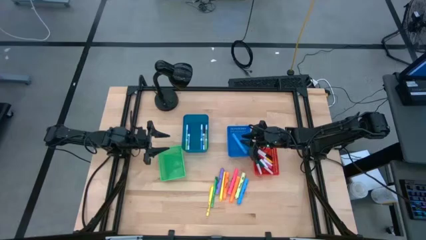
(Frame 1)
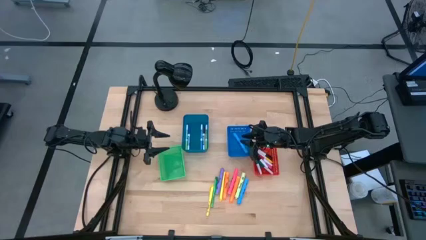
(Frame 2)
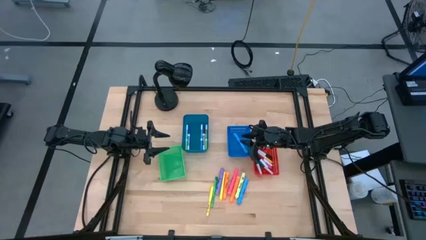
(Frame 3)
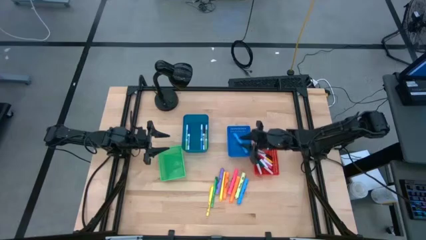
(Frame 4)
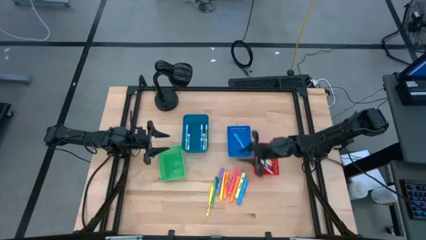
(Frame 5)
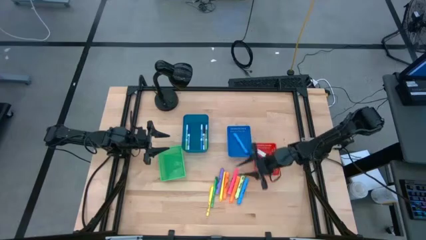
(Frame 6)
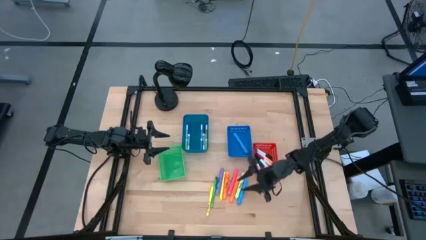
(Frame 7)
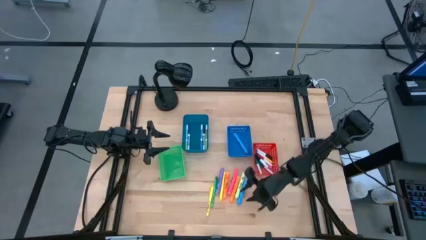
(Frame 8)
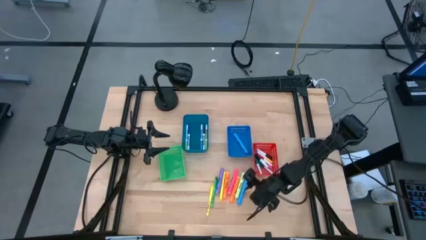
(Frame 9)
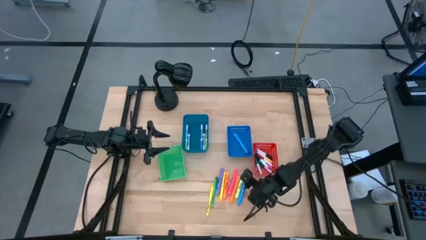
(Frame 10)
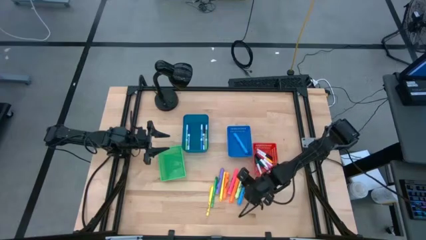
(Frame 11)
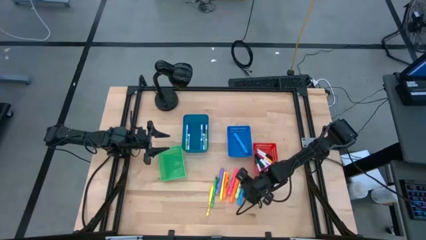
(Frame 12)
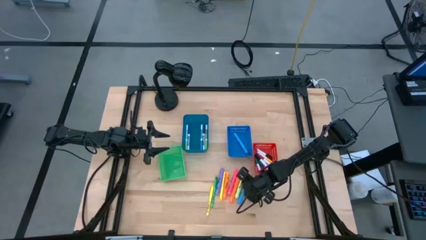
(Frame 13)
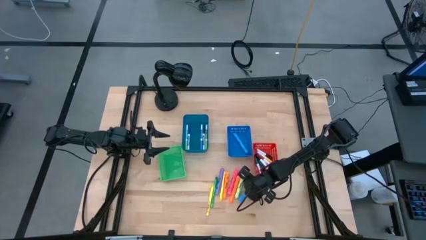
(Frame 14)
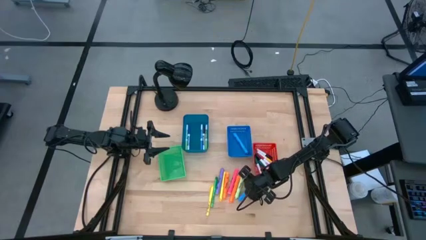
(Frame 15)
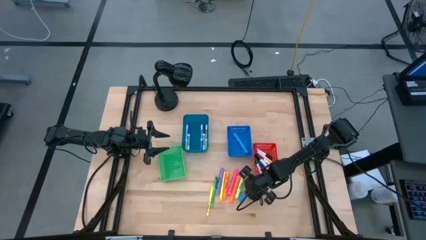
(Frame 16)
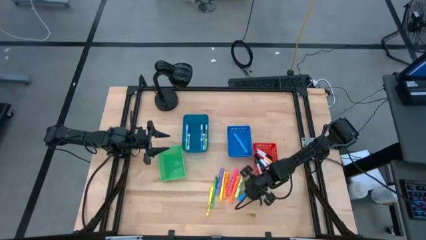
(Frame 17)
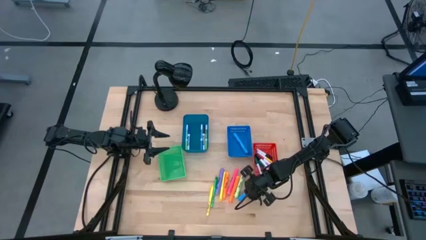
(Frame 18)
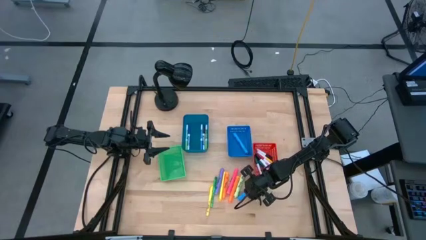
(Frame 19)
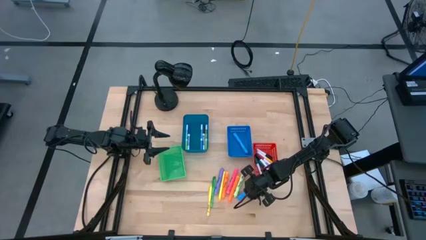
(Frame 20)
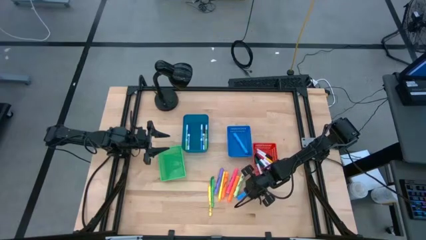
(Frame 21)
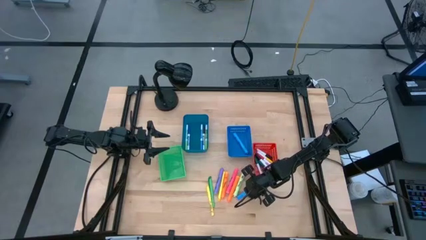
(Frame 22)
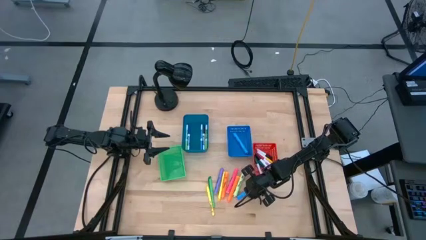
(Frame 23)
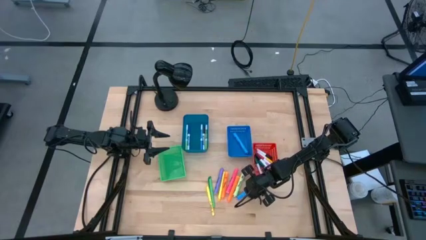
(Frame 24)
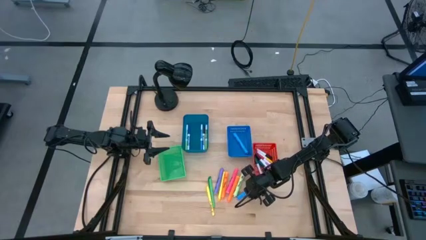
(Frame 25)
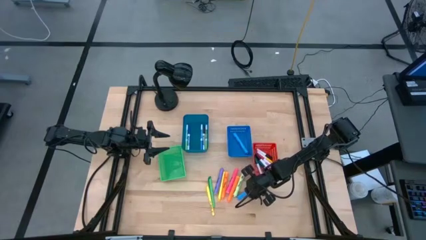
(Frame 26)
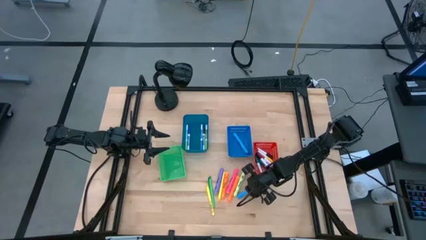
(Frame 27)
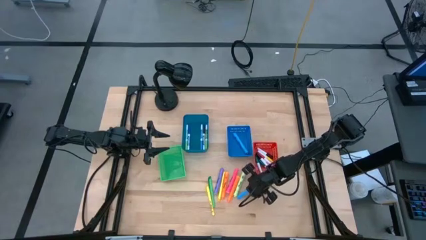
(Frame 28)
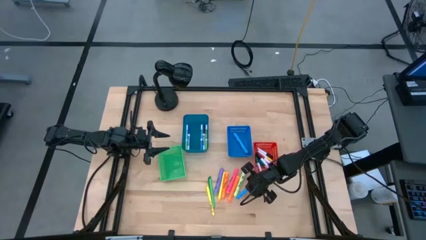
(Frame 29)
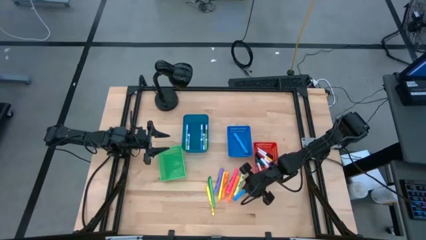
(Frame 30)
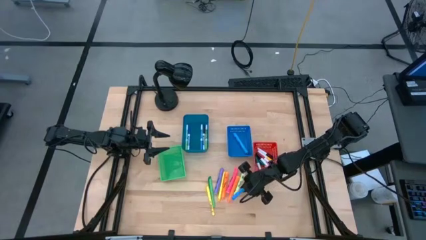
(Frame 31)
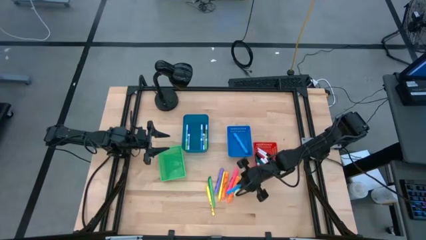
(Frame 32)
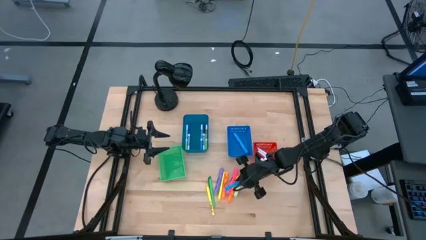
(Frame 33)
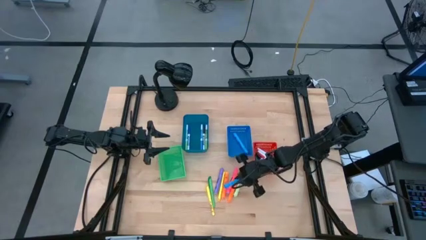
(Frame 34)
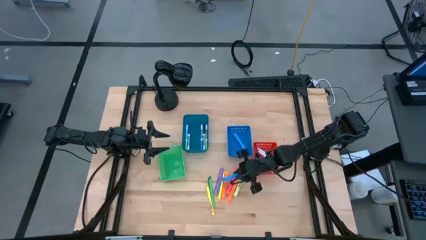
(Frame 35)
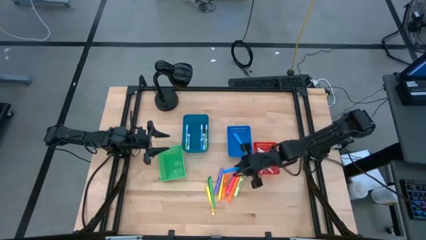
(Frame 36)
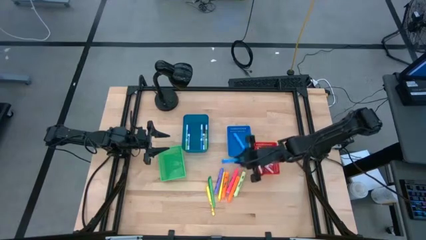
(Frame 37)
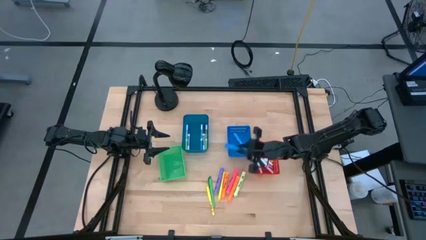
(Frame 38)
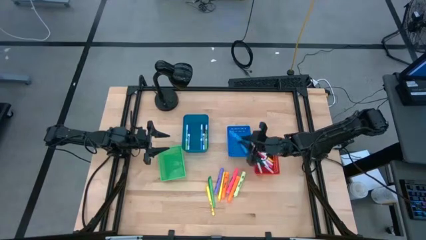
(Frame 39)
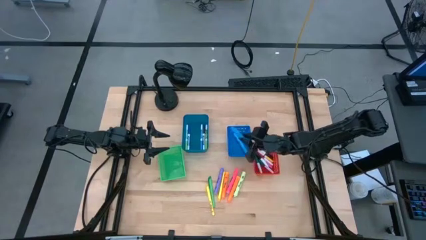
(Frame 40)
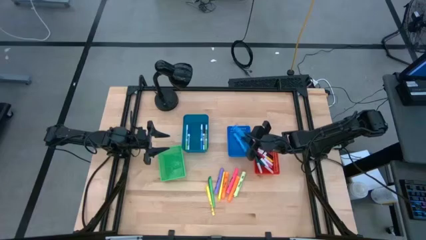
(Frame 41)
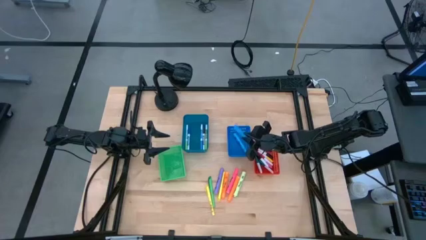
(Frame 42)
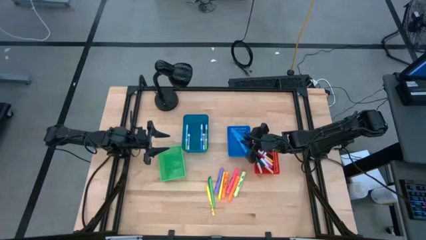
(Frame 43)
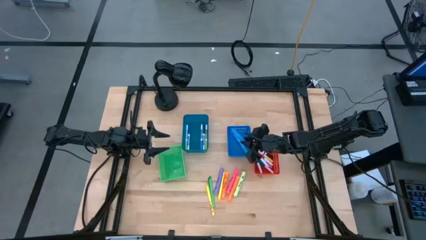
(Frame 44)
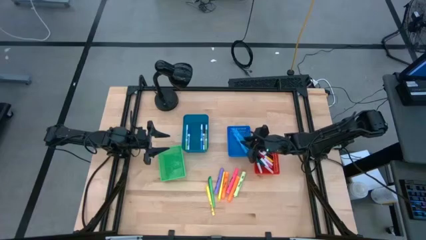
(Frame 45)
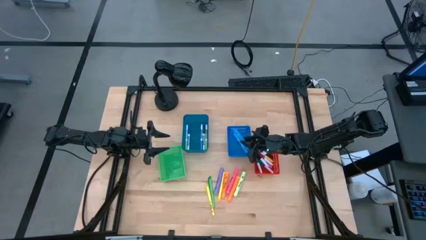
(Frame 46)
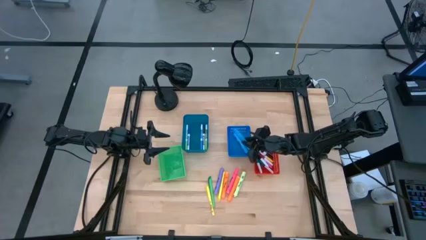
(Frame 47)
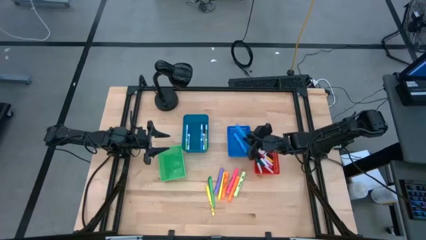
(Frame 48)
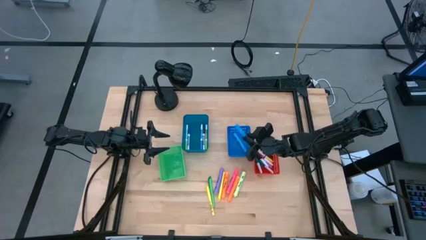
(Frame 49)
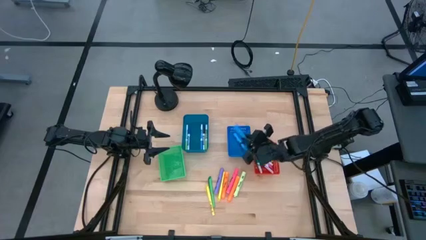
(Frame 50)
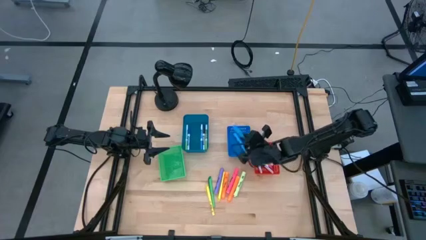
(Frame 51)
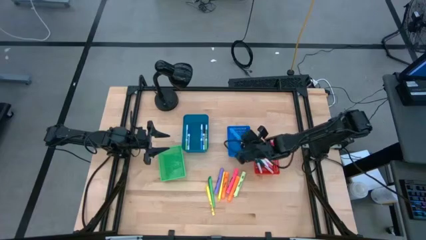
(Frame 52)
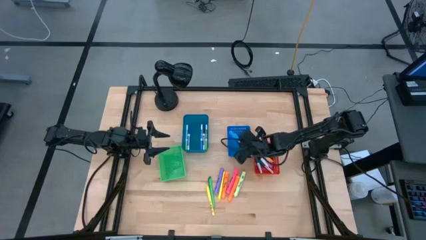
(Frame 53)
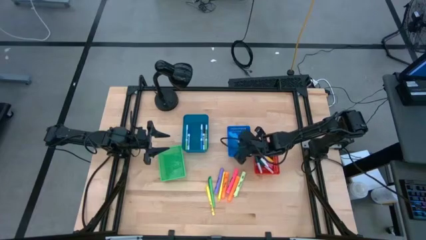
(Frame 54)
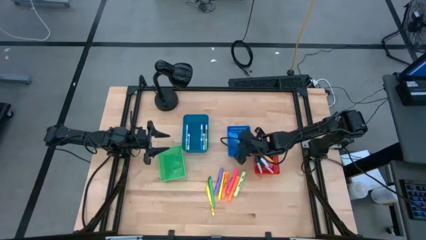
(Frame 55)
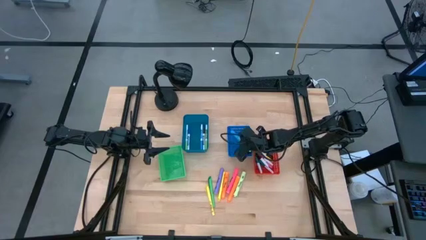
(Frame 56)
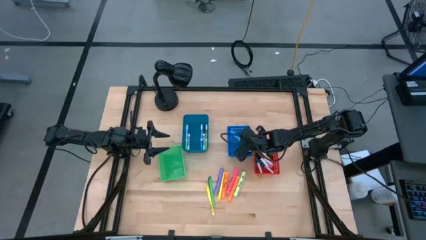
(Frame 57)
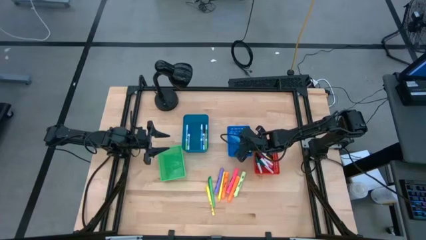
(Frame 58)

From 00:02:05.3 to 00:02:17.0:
Task: Pick & Place Markers
Put the blue highlighter pen into the blue bin

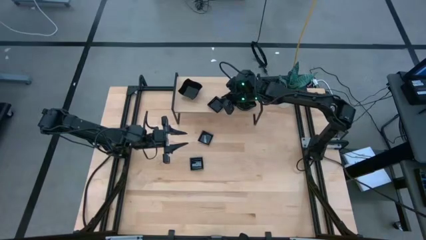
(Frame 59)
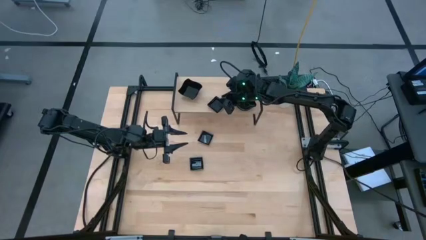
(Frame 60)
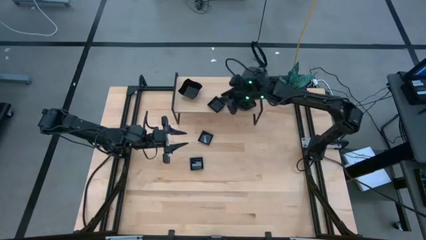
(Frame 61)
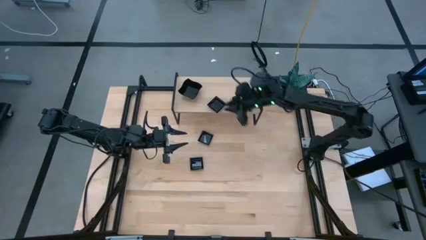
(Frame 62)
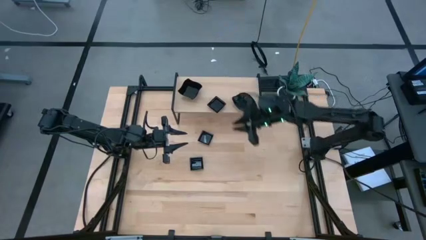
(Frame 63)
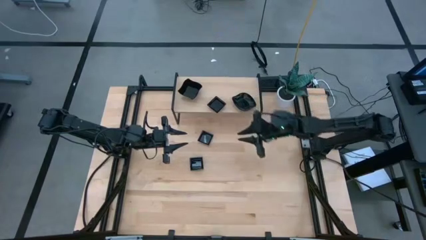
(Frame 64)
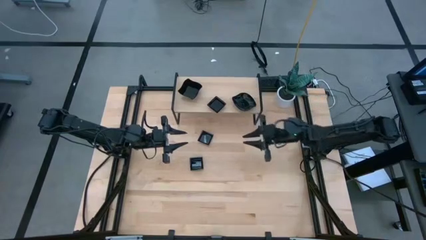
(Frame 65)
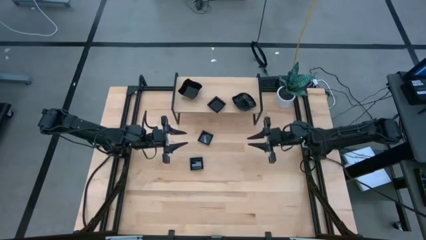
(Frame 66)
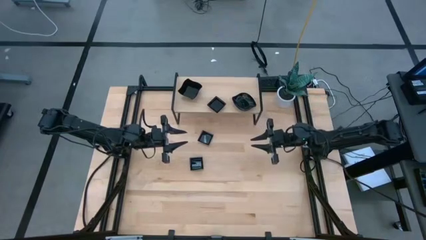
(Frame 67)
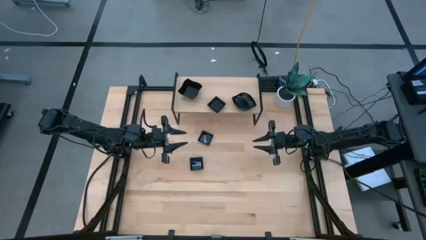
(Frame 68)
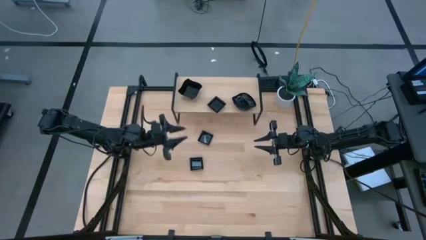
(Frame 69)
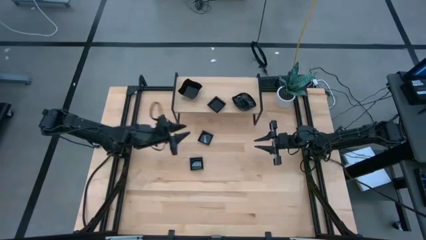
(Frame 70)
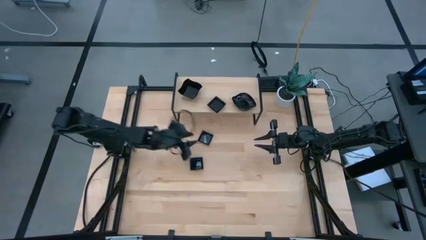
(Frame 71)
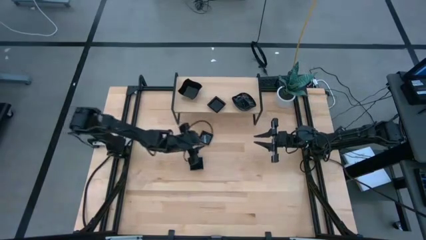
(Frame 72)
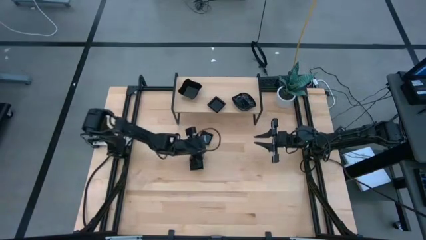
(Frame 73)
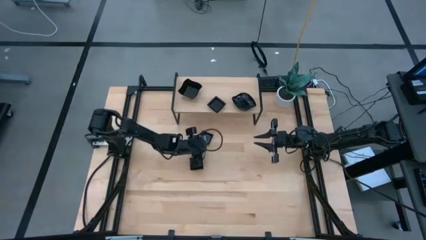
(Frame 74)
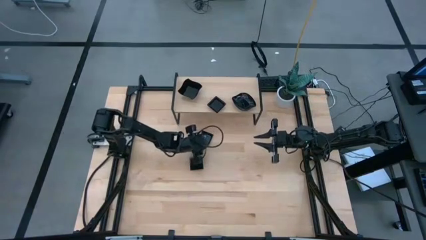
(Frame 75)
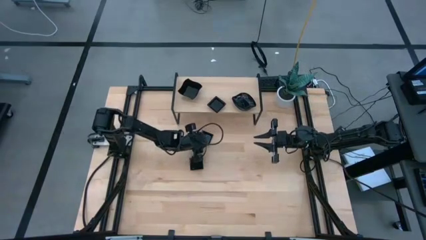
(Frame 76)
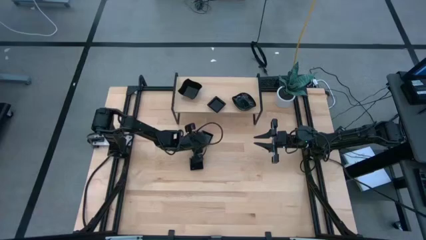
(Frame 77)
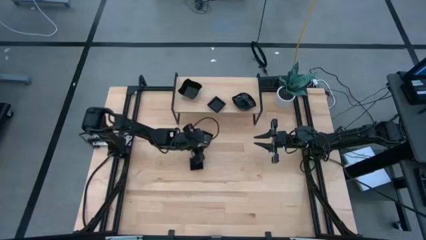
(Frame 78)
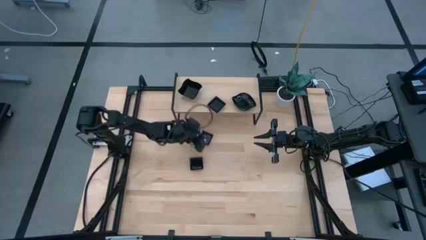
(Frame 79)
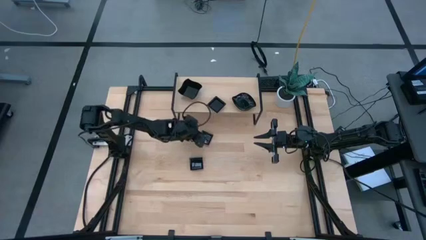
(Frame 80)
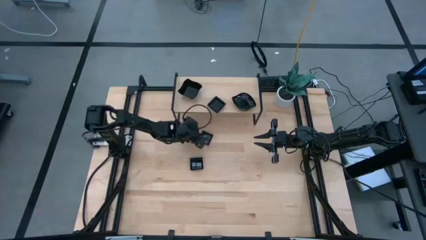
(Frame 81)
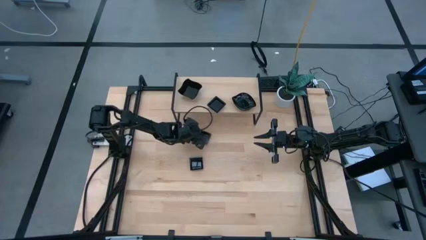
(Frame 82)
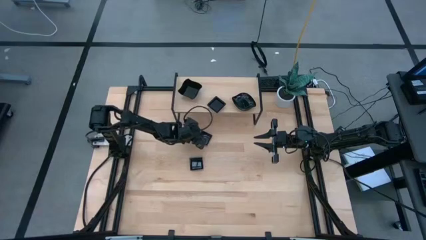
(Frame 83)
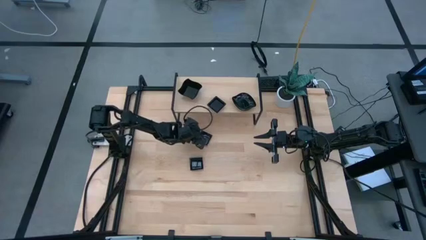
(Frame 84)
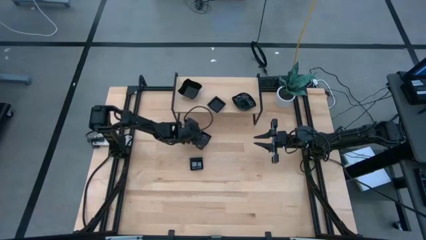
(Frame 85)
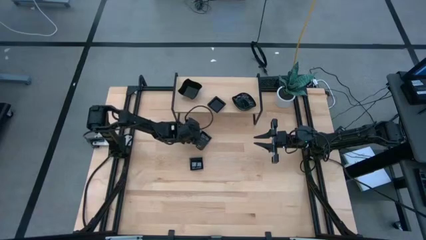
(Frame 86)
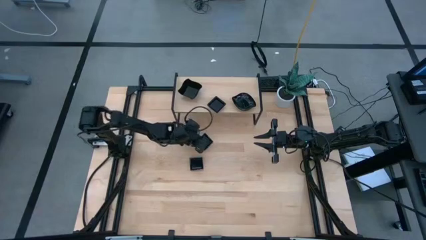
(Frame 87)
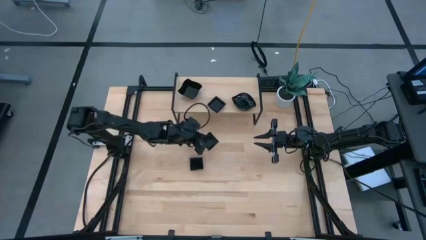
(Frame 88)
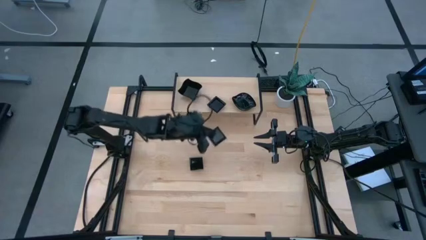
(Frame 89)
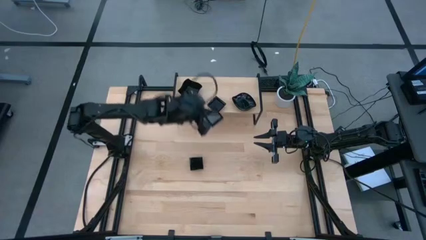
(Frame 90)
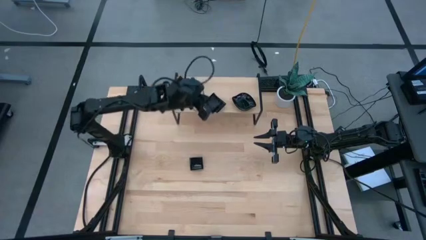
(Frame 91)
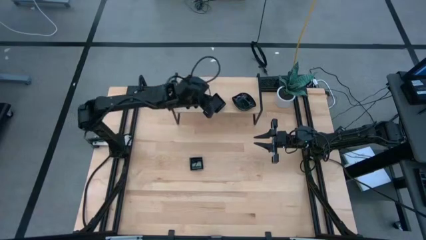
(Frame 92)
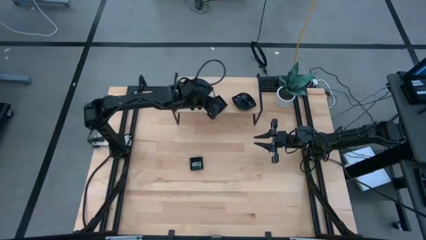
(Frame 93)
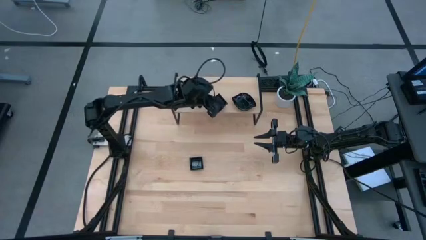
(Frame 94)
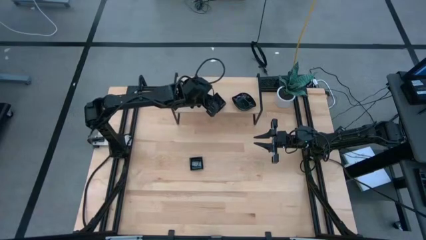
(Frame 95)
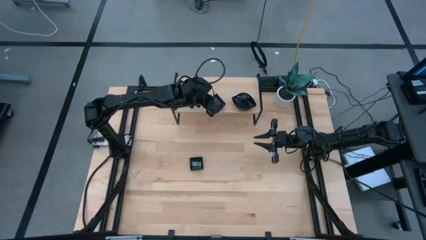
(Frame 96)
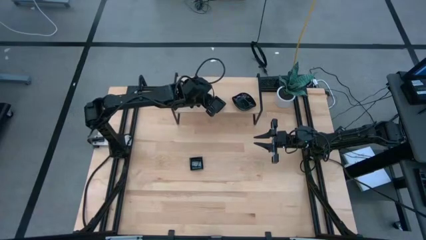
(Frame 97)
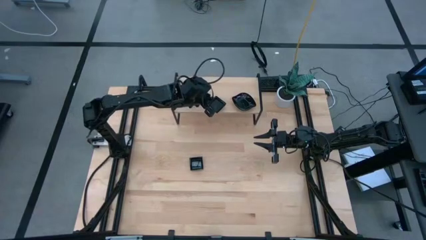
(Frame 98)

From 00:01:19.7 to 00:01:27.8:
Task: Pick & Place Mini shaped plates
Stack the top square plate on top of the other square plates on the shelf
